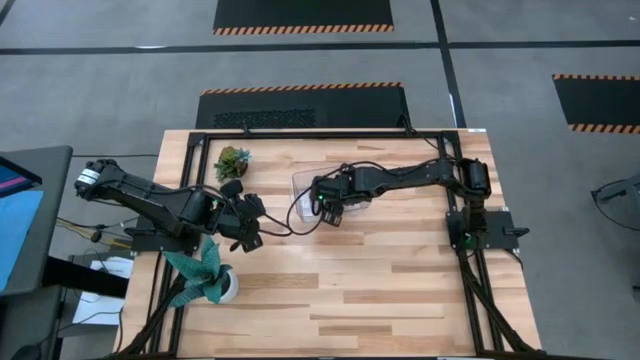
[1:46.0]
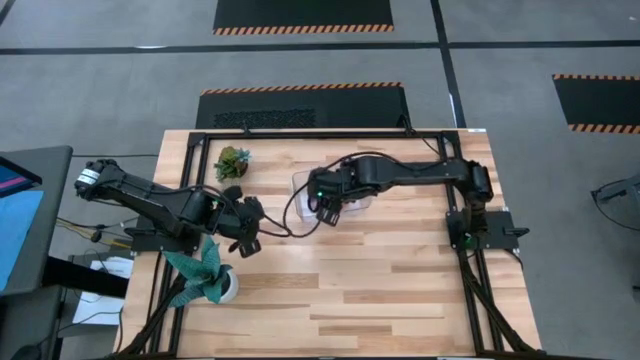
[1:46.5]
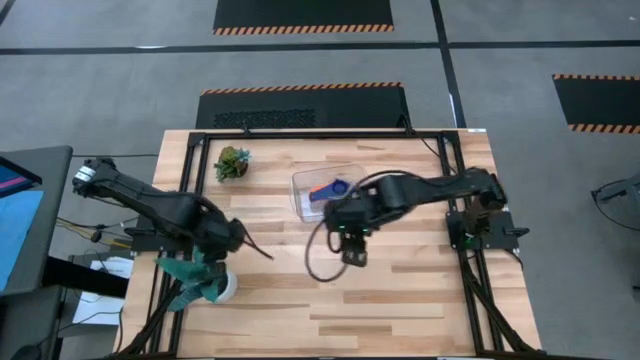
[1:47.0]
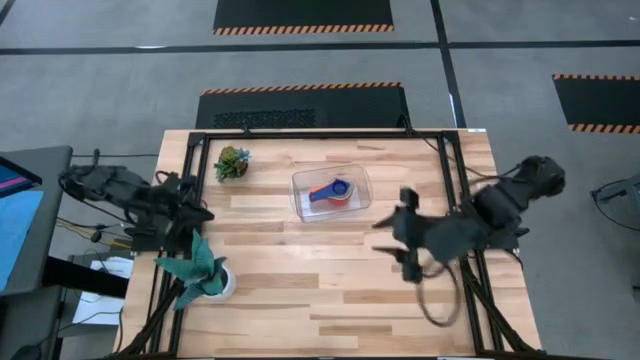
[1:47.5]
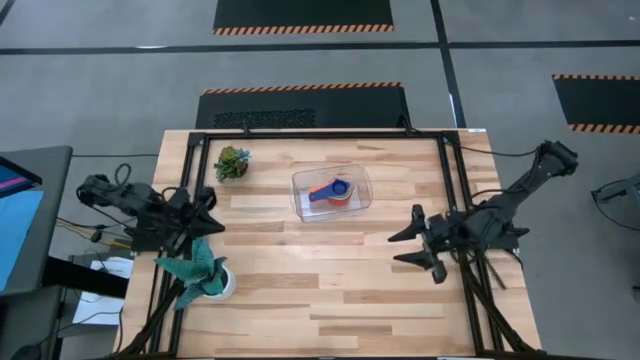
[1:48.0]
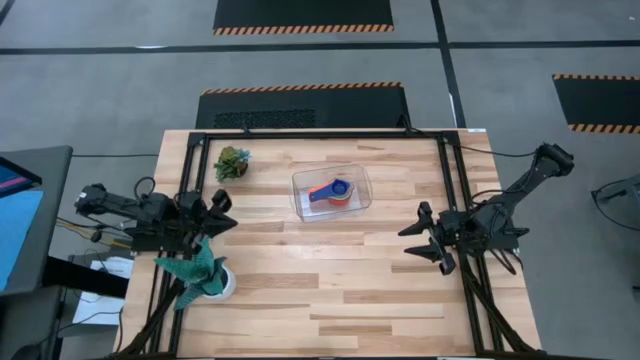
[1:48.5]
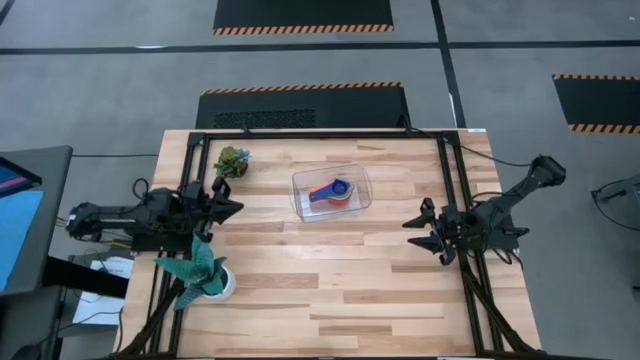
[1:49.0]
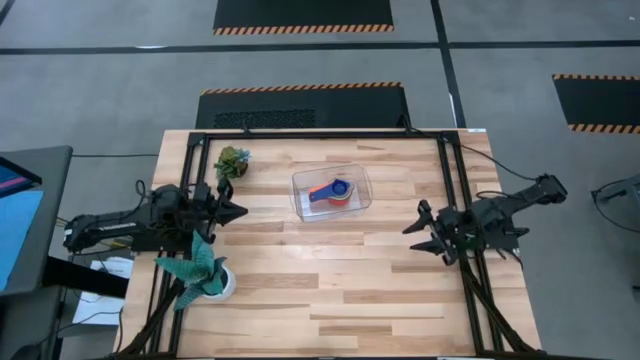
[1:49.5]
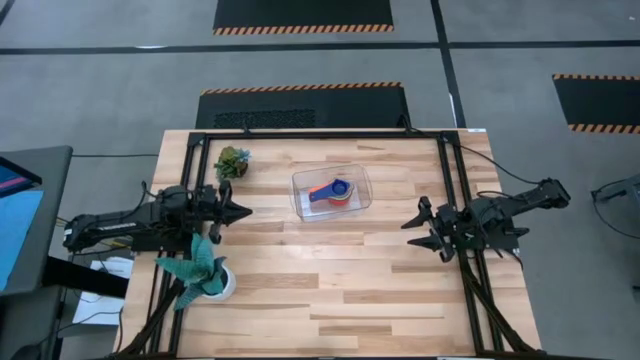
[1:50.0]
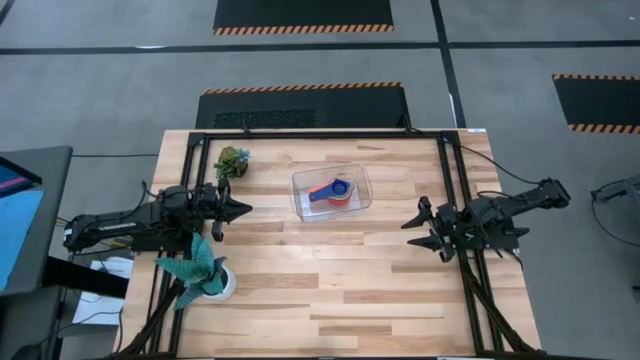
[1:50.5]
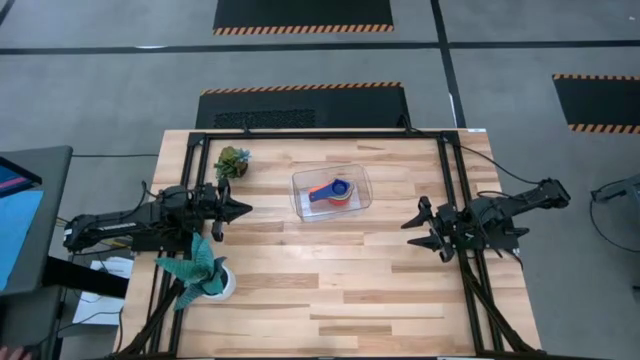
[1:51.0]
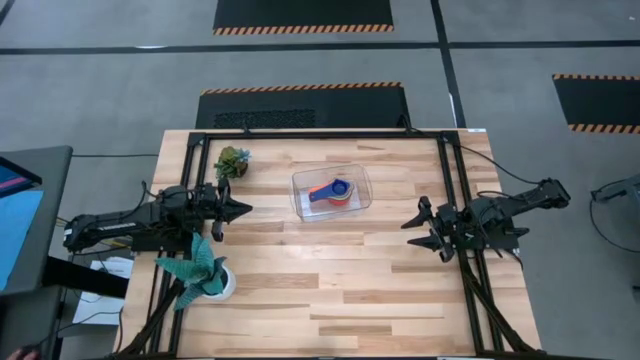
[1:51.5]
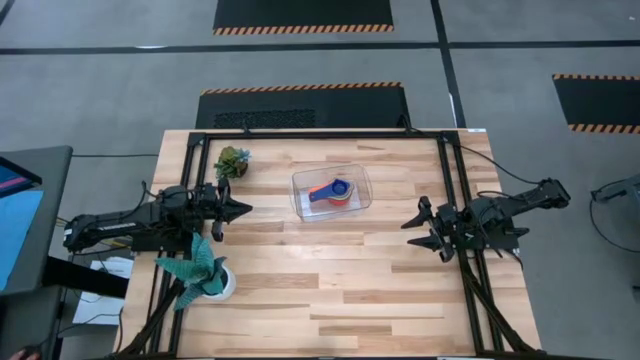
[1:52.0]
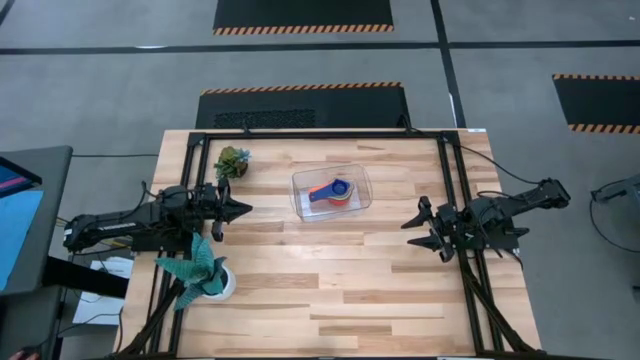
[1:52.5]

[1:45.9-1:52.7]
Task: Nest measuring cups in basket
Return to Home Position

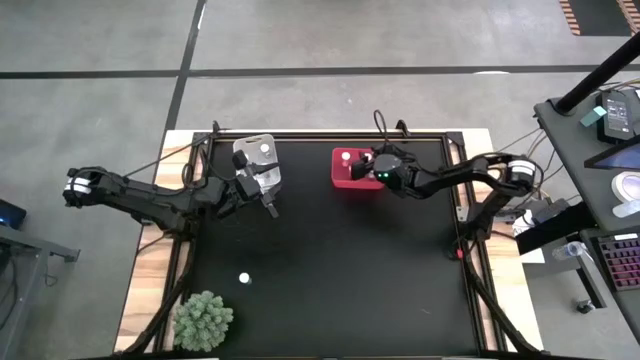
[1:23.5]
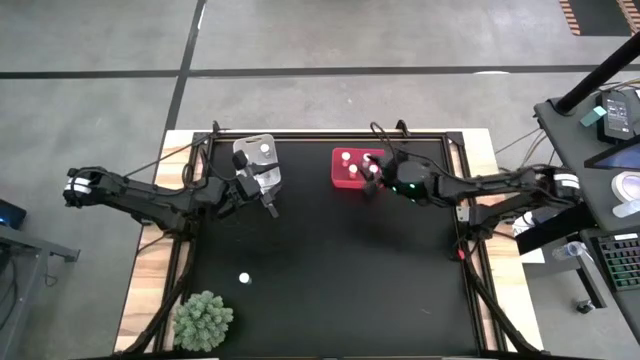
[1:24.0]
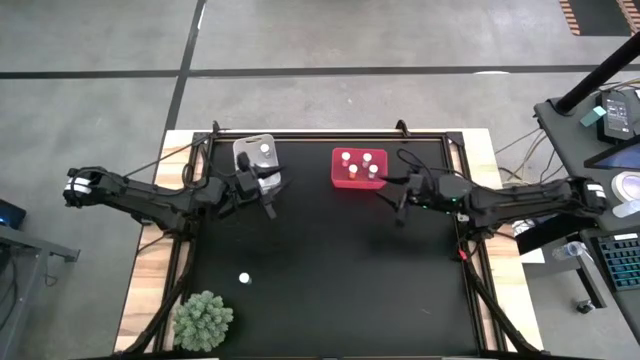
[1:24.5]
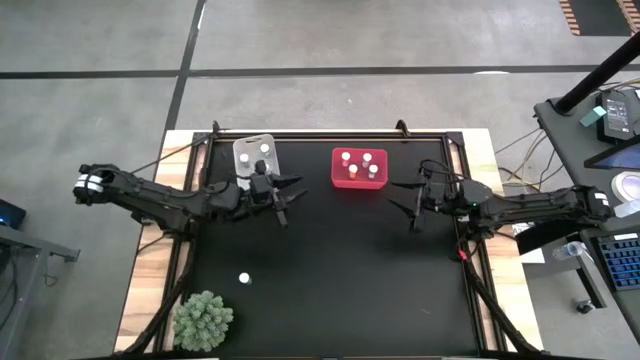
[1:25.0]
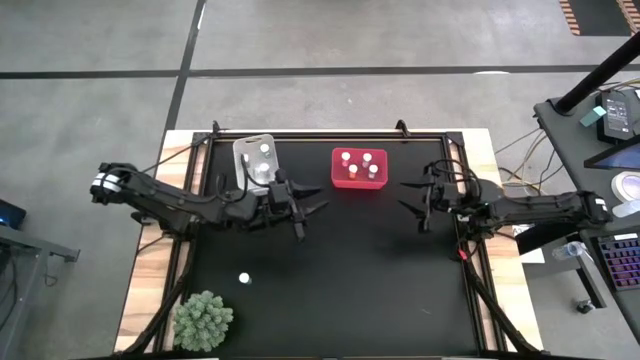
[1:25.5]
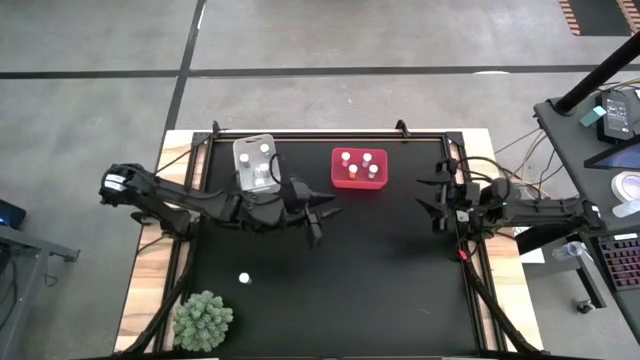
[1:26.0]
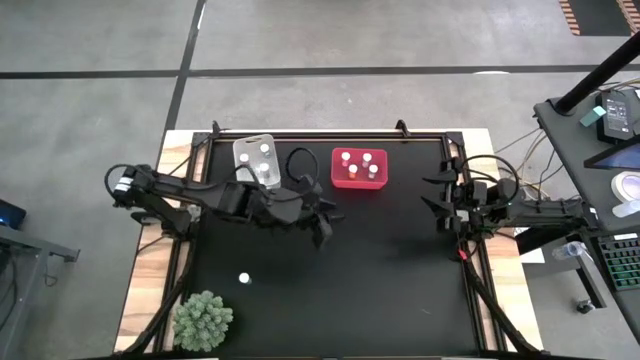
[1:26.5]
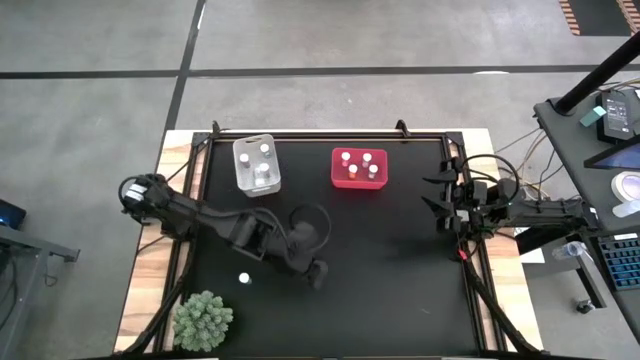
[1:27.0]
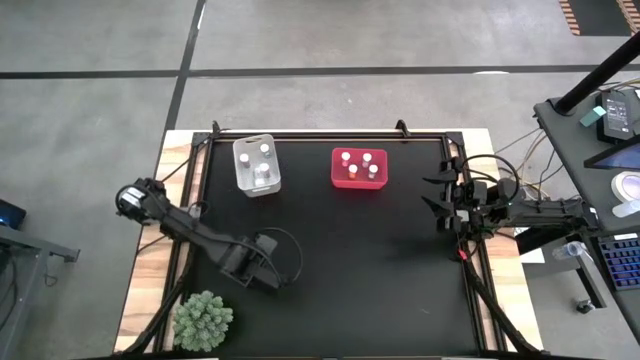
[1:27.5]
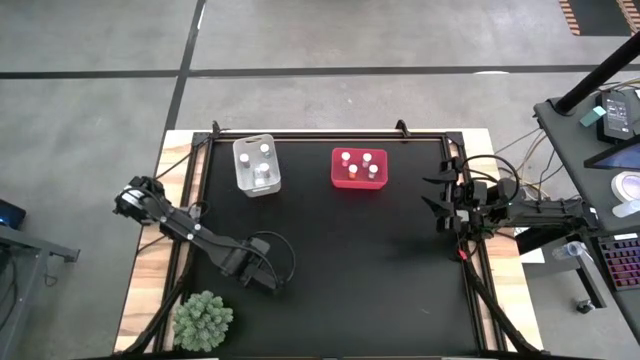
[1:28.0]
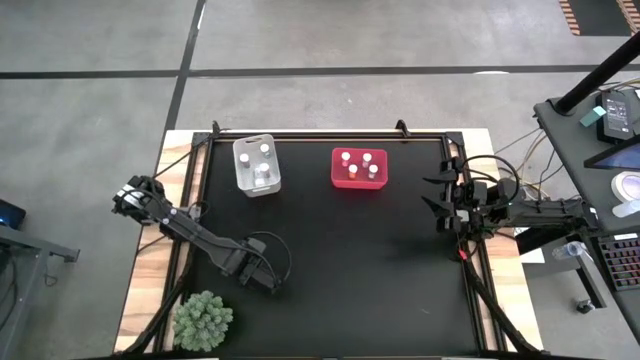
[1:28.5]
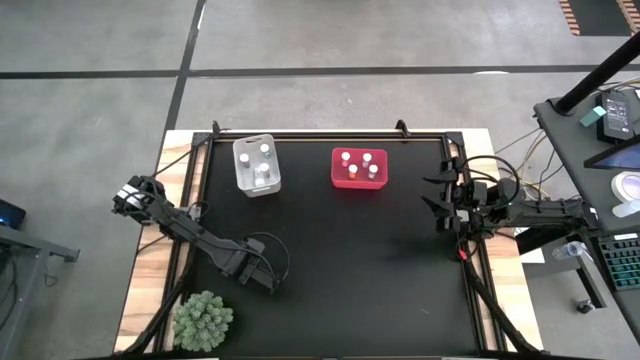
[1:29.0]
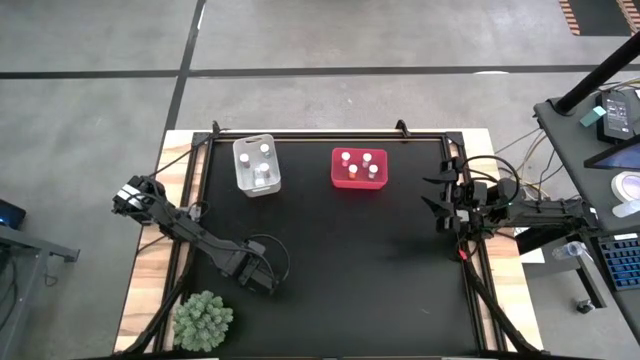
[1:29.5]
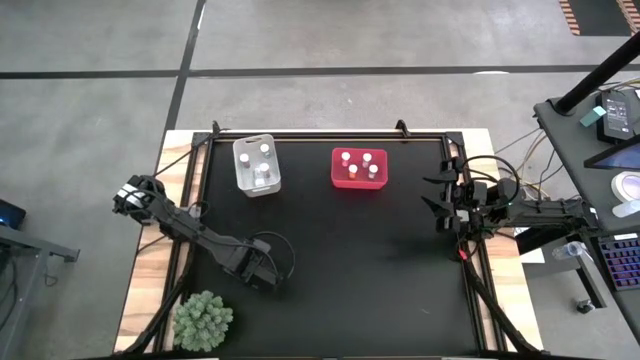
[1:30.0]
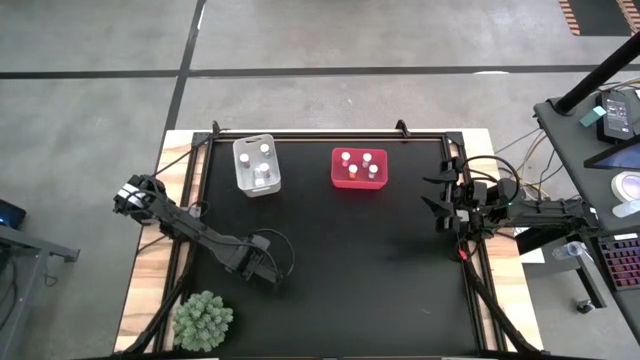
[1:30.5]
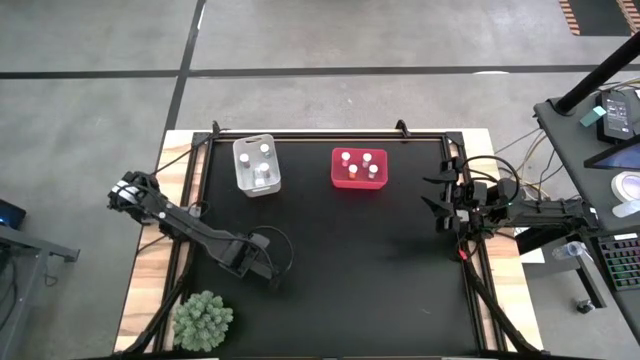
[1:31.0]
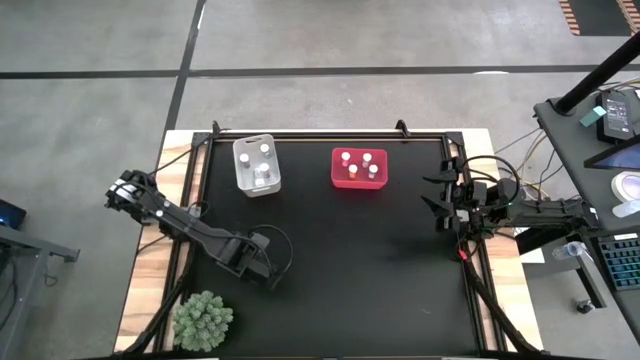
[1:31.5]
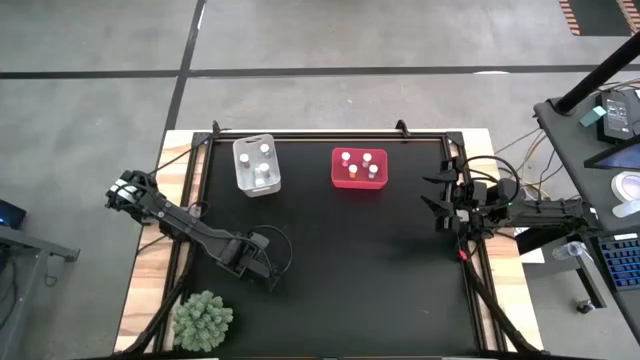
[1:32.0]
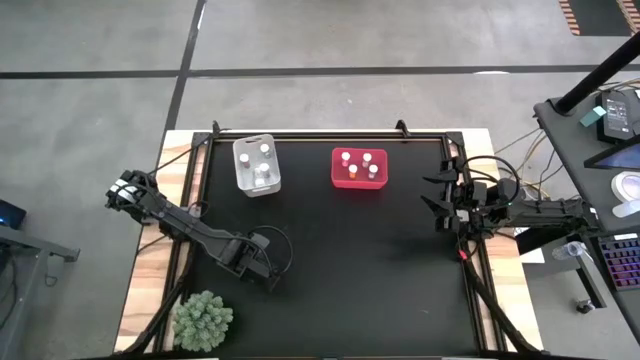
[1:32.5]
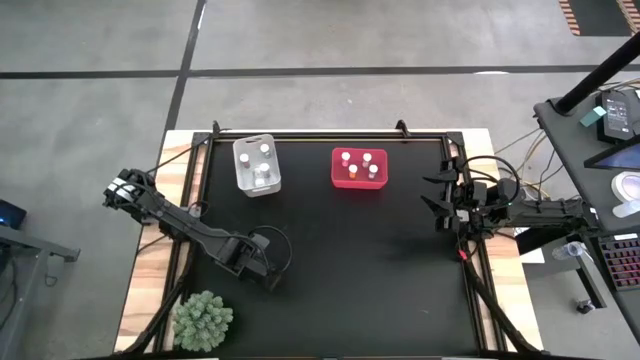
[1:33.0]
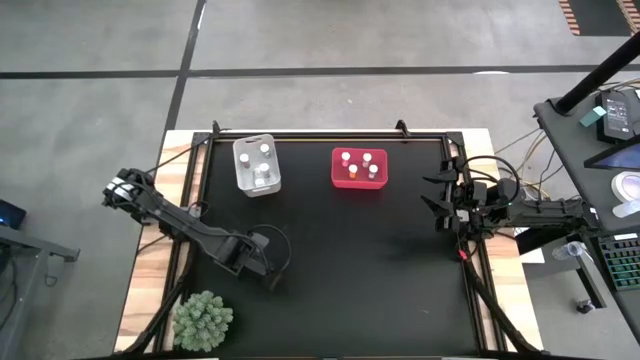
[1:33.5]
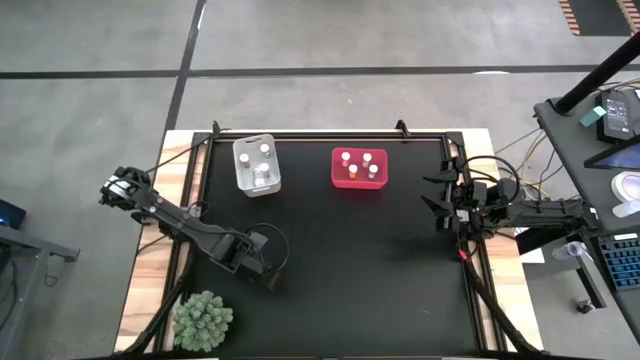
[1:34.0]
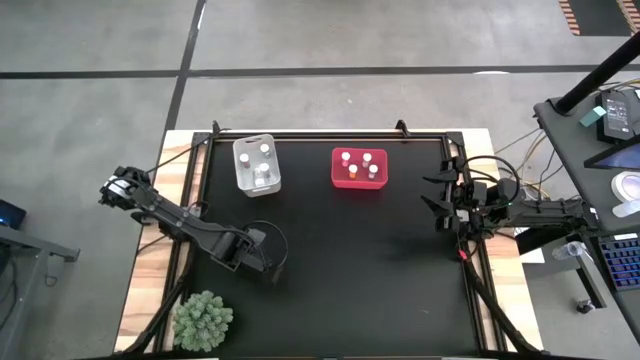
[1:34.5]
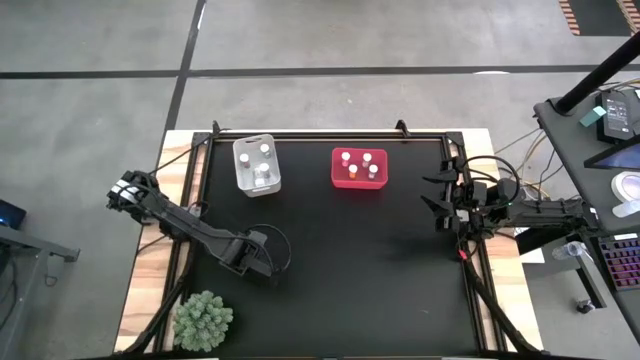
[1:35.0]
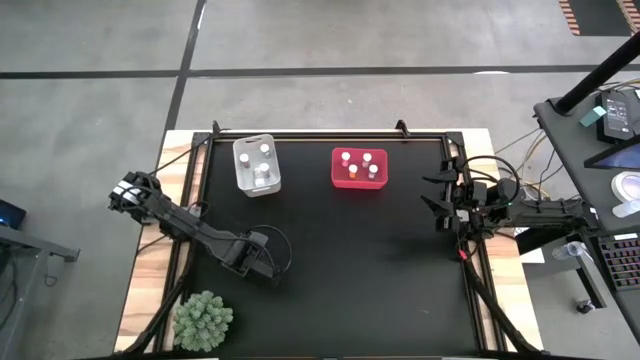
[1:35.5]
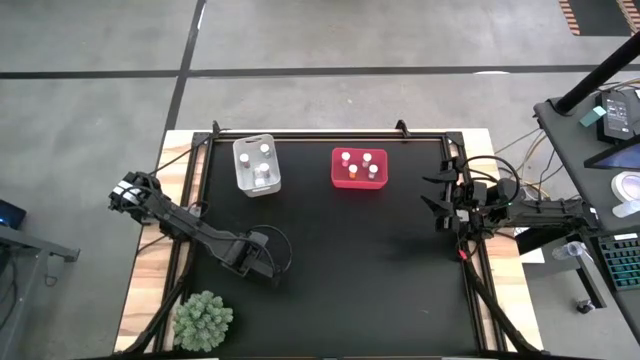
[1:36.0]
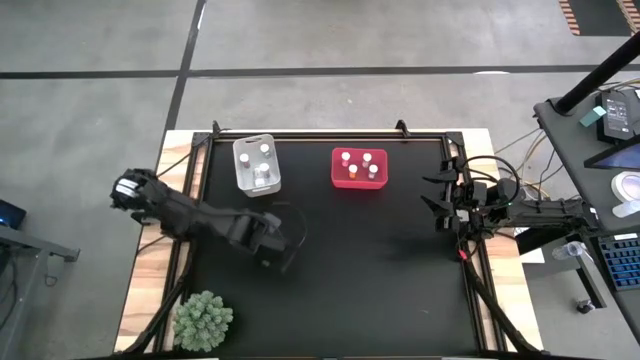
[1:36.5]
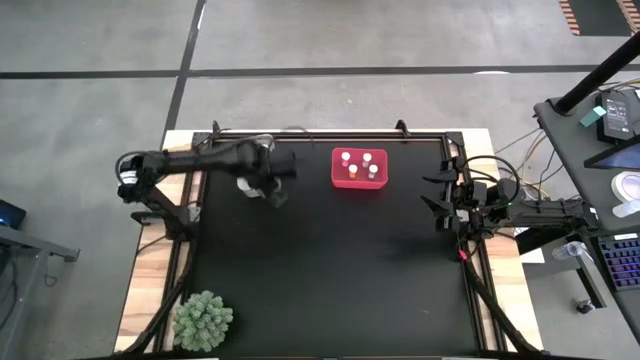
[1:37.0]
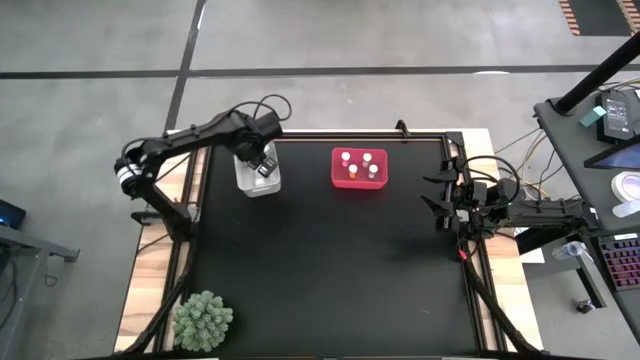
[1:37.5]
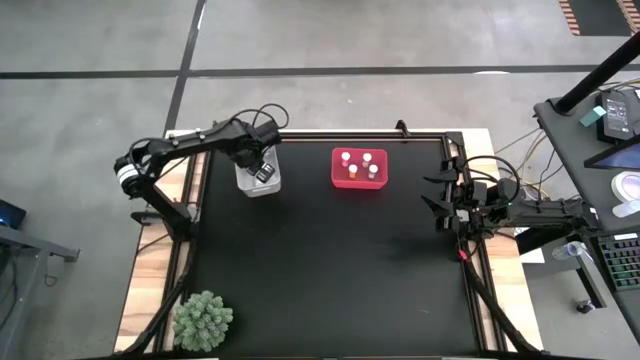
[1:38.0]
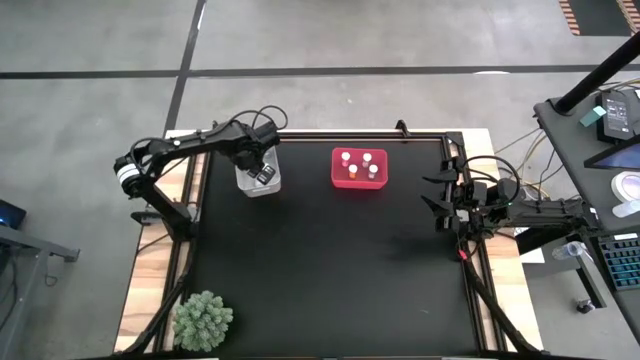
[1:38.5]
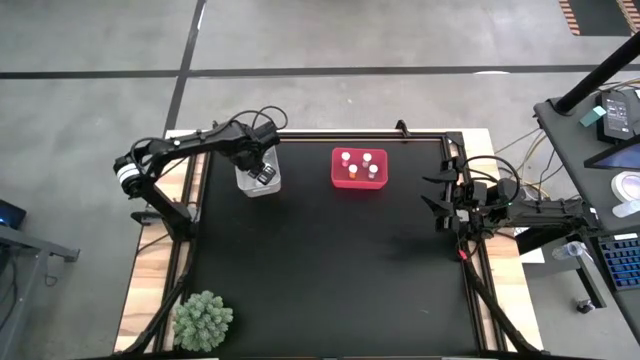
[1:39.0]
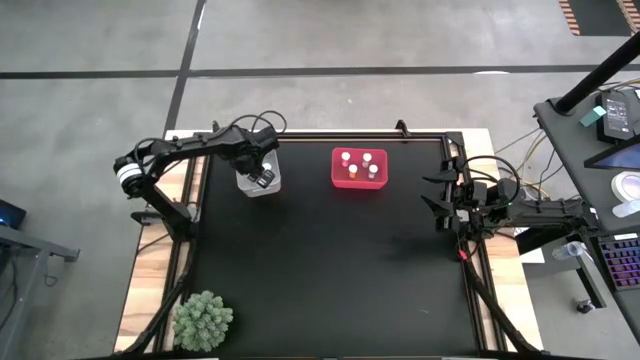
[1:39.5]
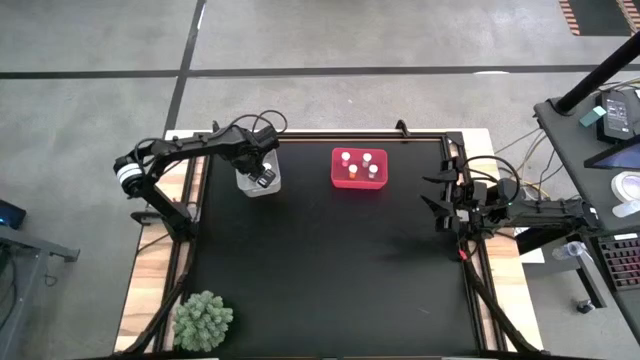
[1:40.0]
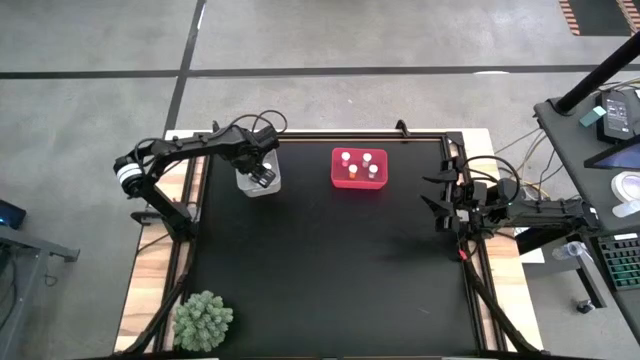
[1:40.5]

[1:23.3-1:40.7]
Task: Pick and place medicine bottles into bin by pill shape (circle, oval)
Put the blue capsule bottle into the gray bin
